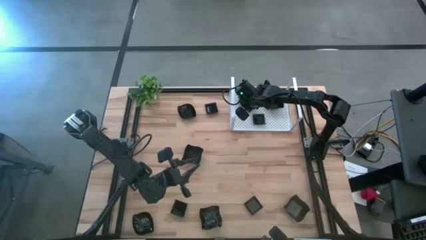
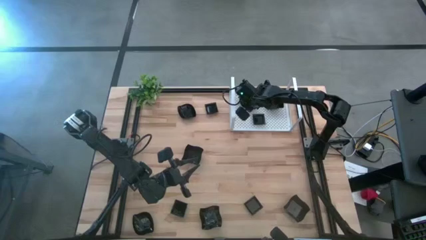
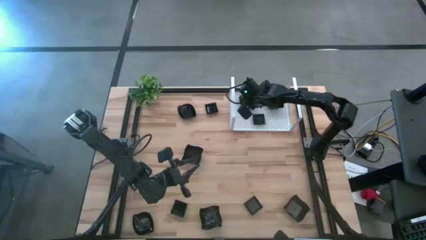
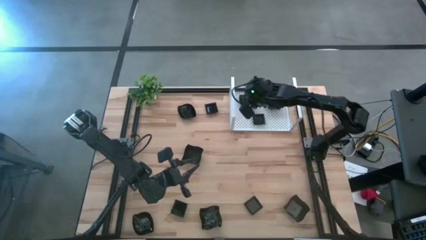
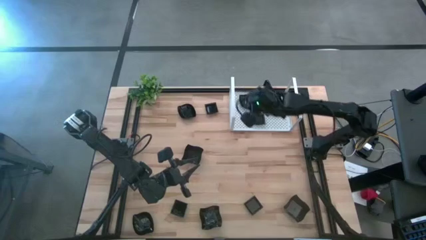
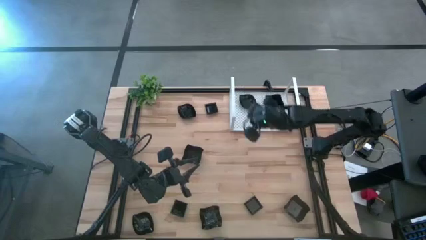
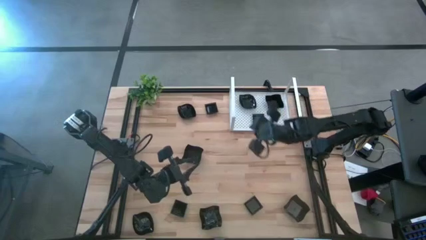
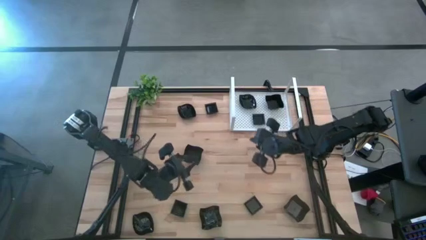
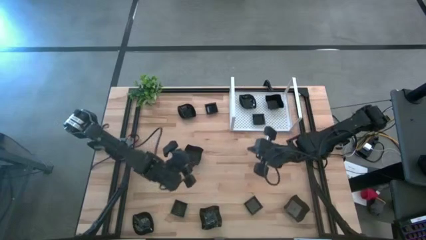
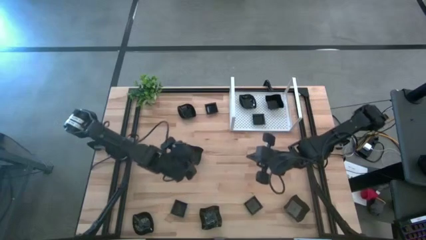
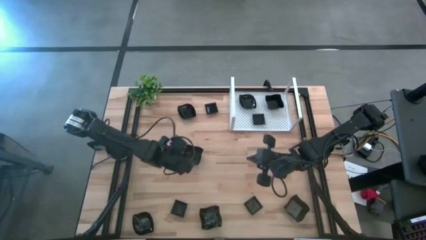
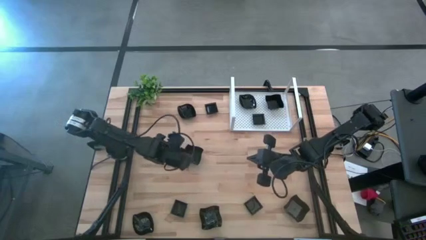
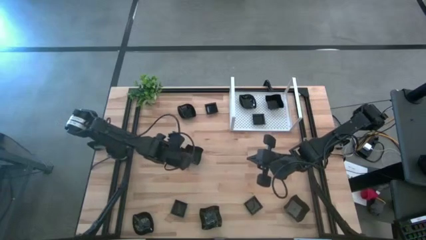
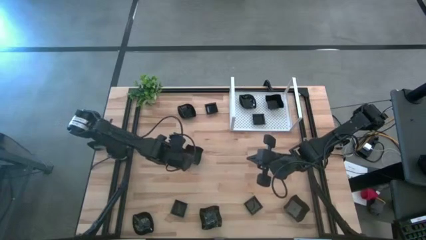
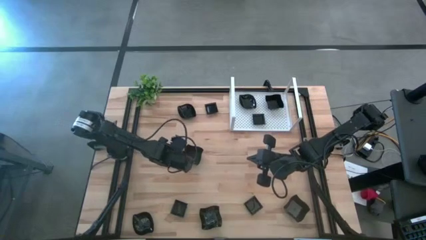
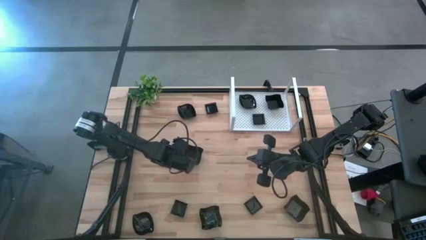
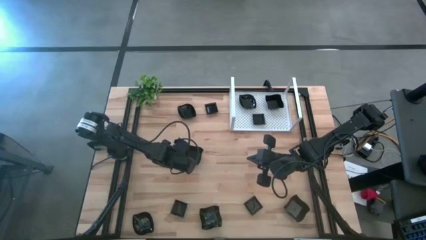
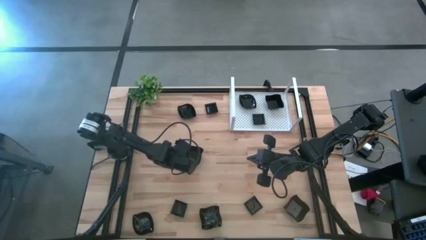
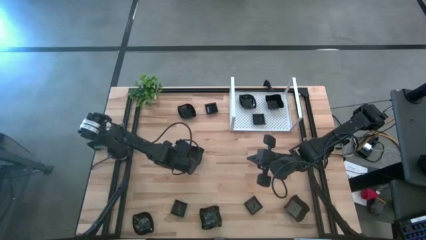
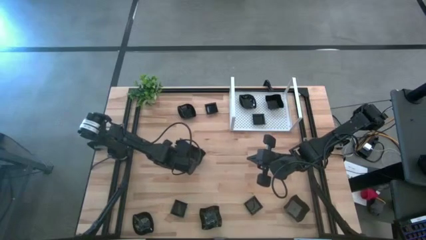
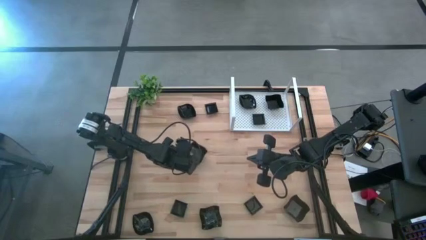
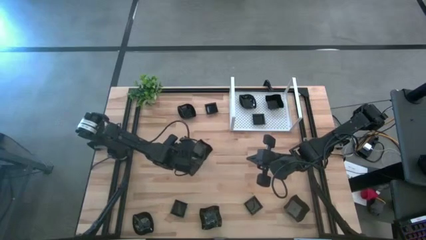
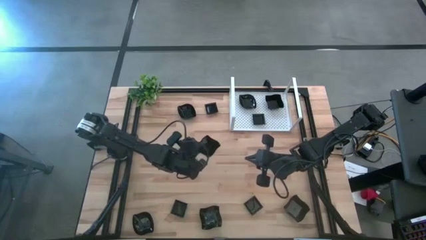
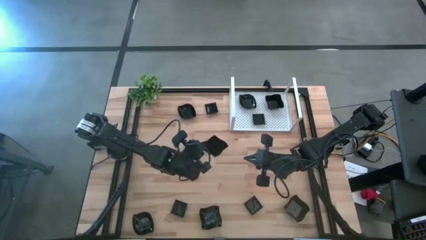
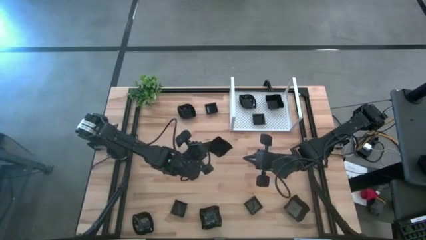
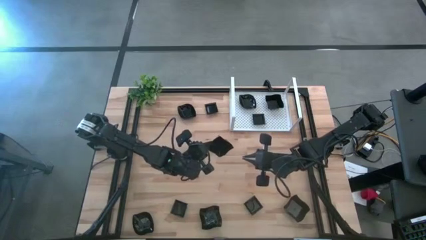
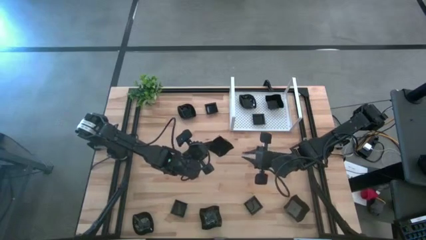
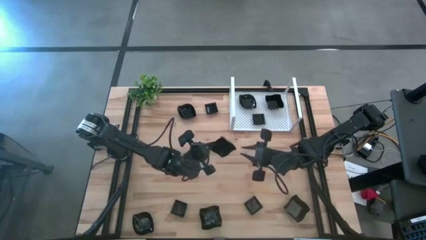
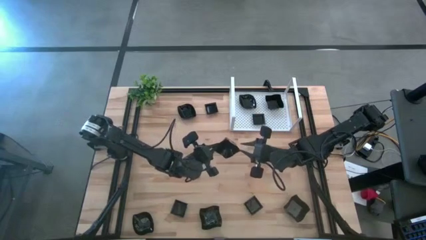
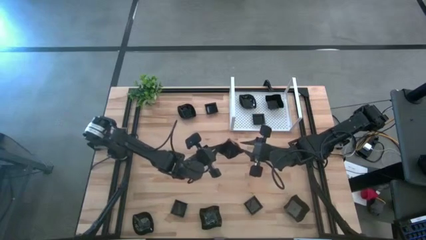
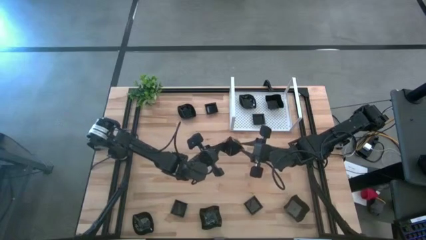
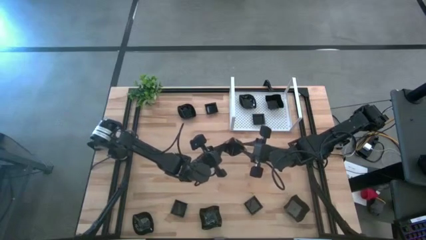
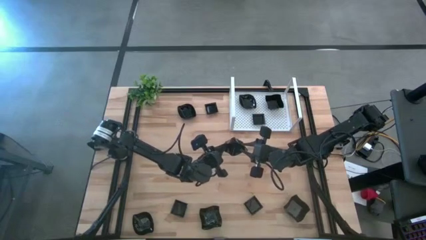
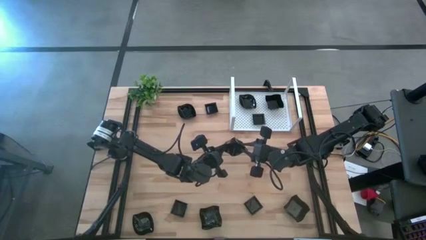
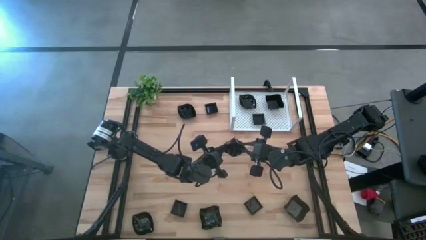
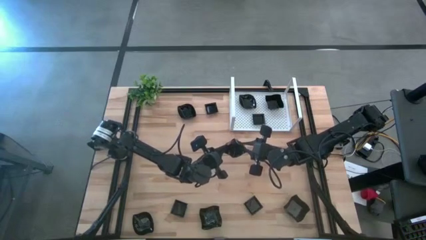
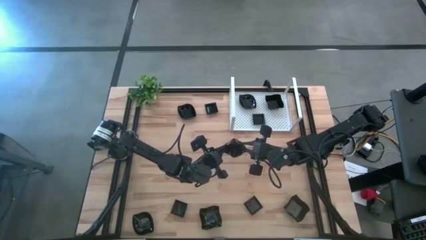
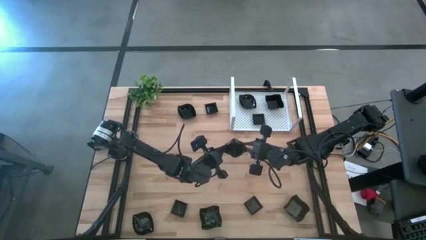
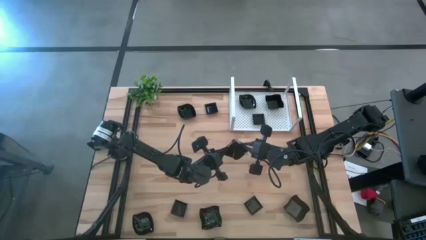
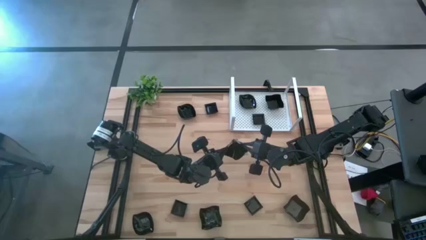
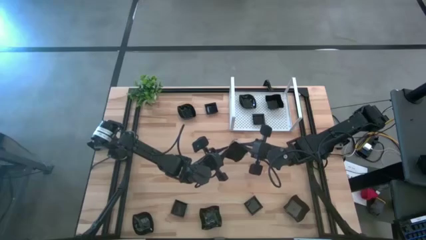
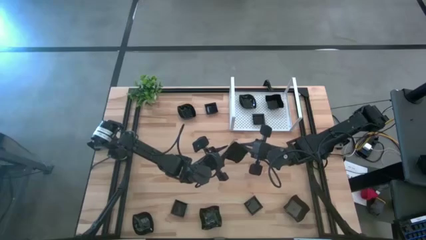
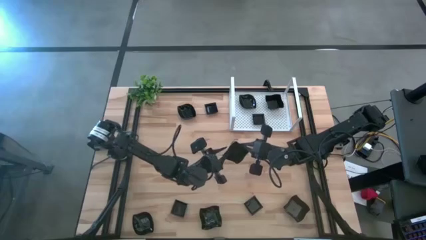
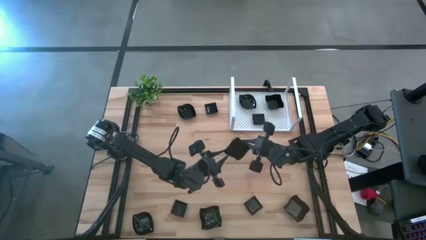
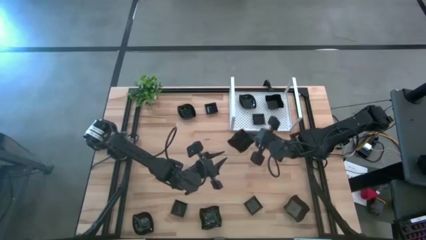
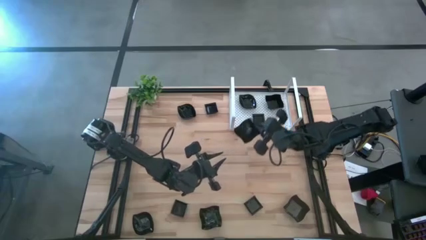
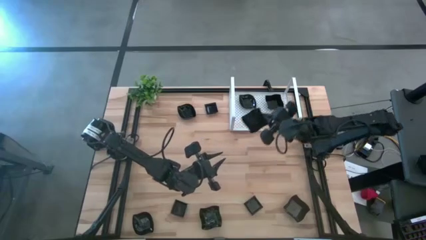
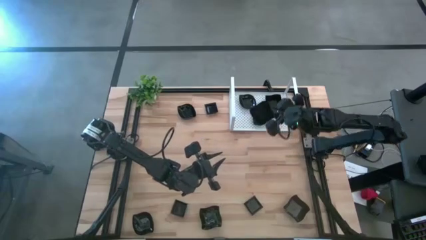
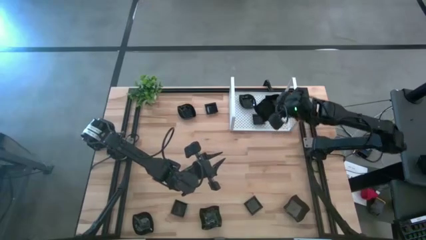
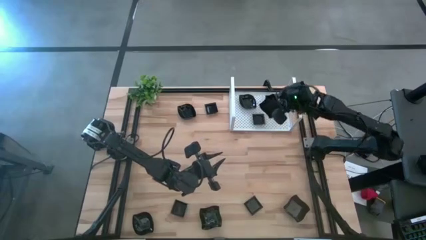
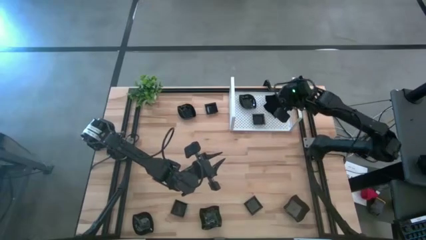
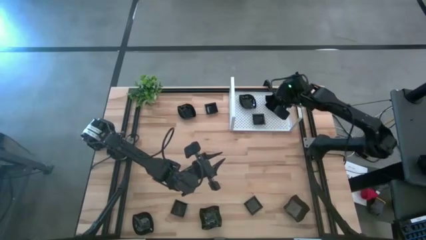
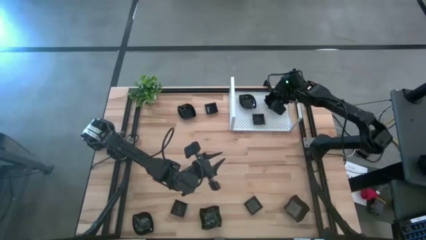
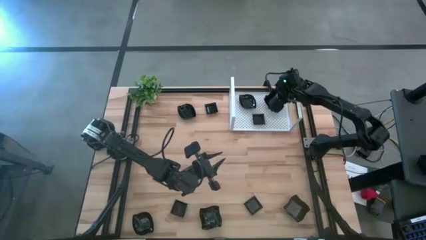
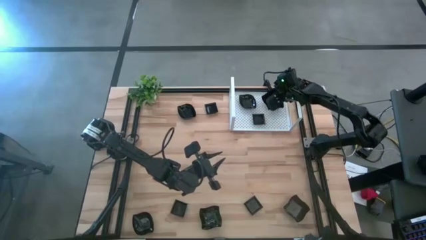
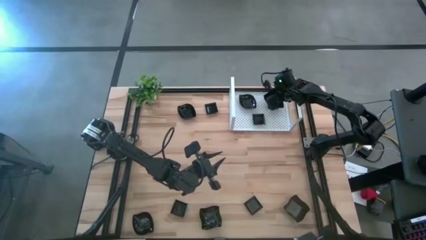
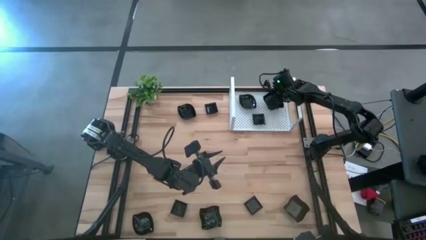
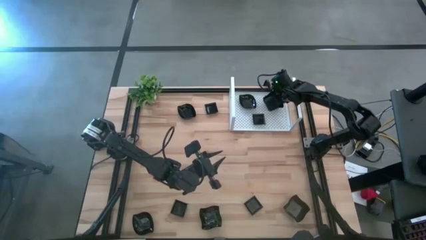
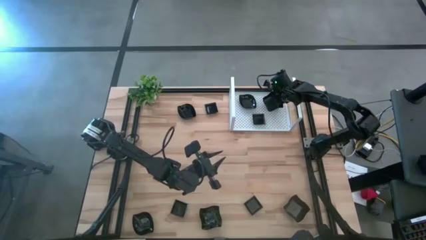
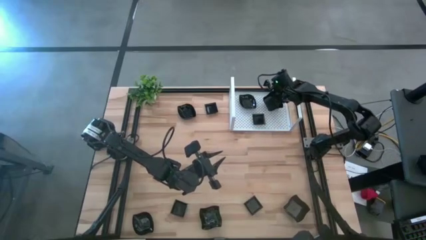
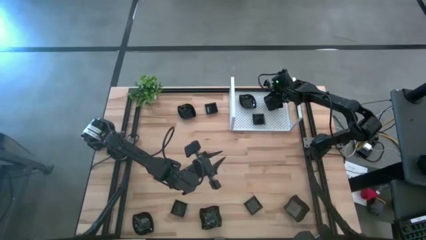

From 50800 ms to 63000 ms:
Task: Pick & Place Mini shaped plates
Stack the distorted square plate on top of the other distorted square plate on the shelf
